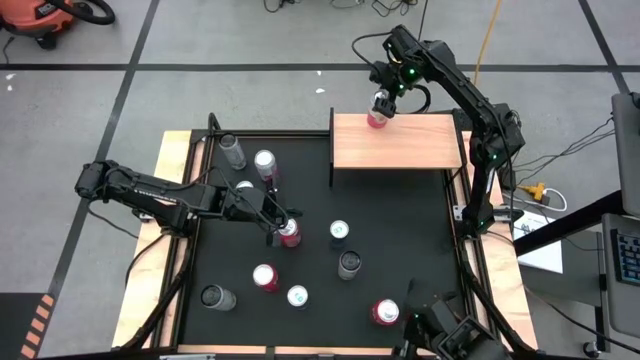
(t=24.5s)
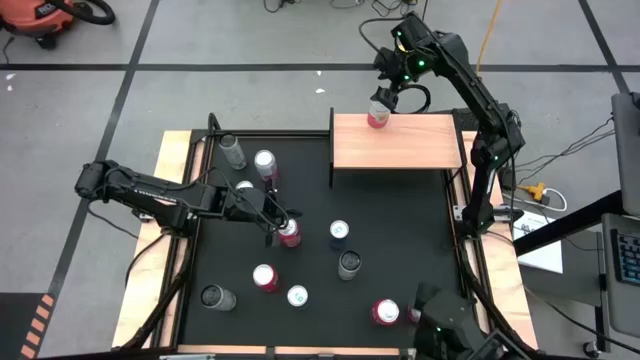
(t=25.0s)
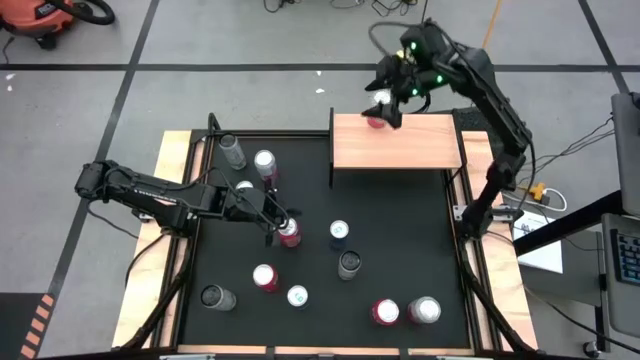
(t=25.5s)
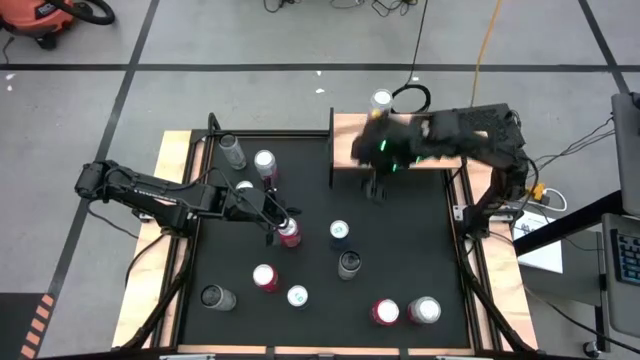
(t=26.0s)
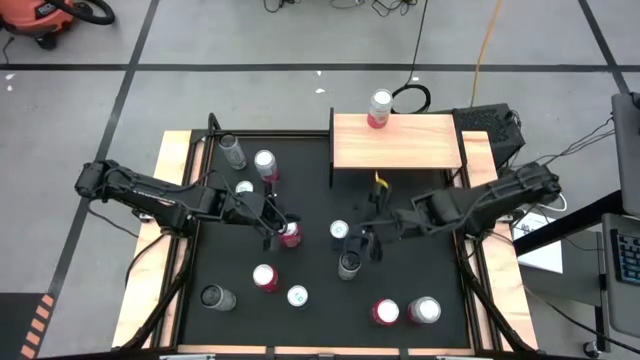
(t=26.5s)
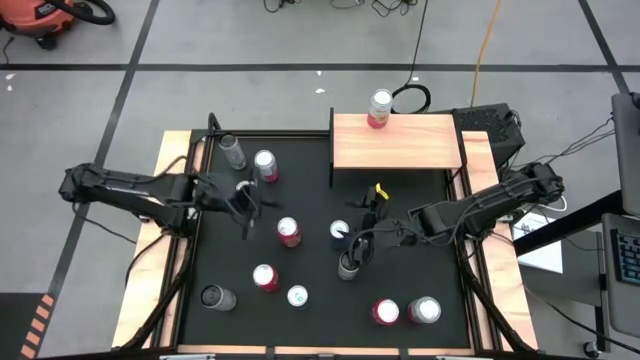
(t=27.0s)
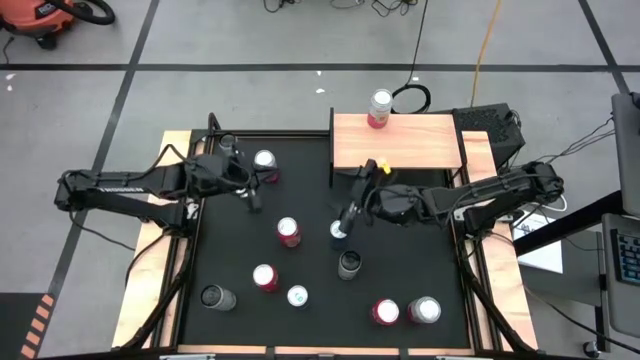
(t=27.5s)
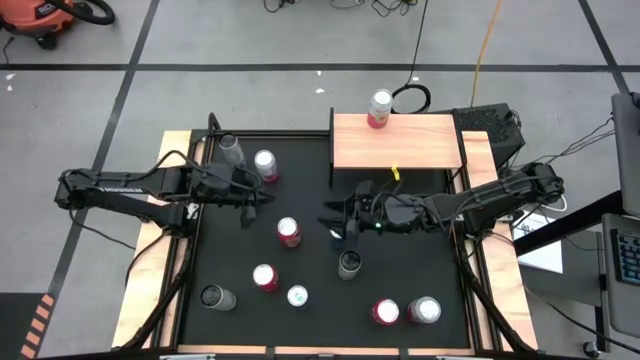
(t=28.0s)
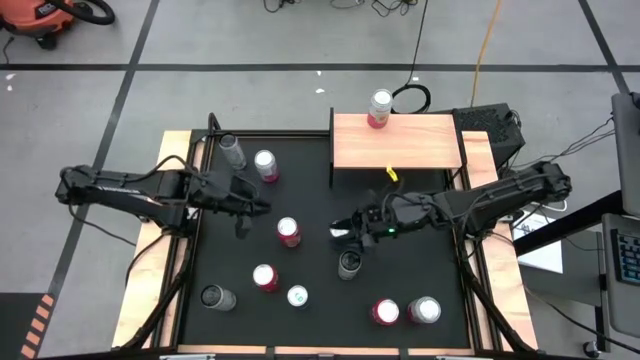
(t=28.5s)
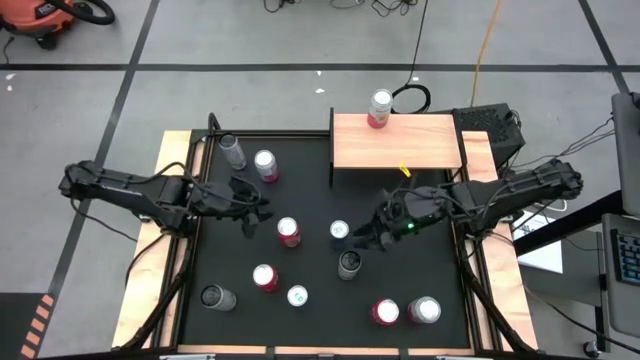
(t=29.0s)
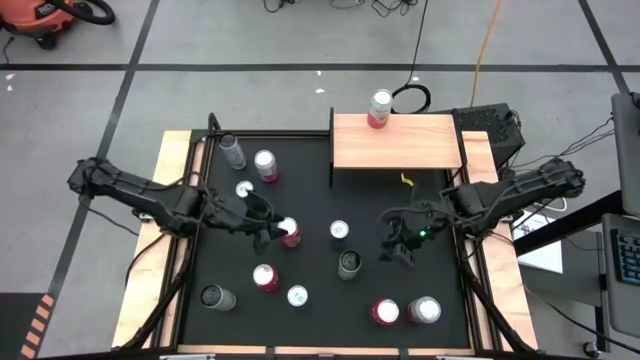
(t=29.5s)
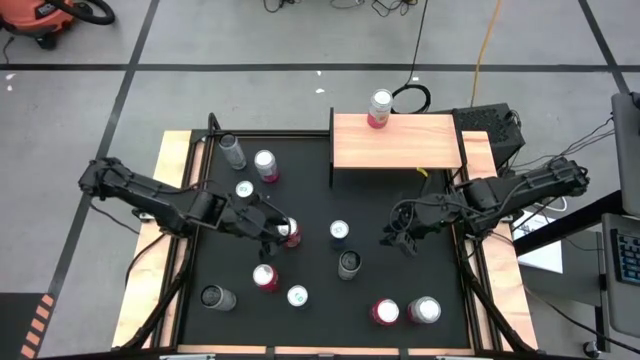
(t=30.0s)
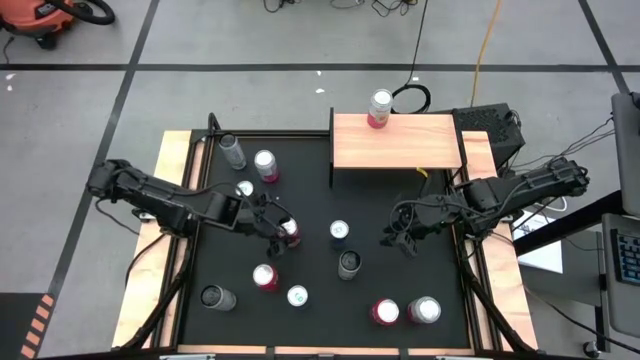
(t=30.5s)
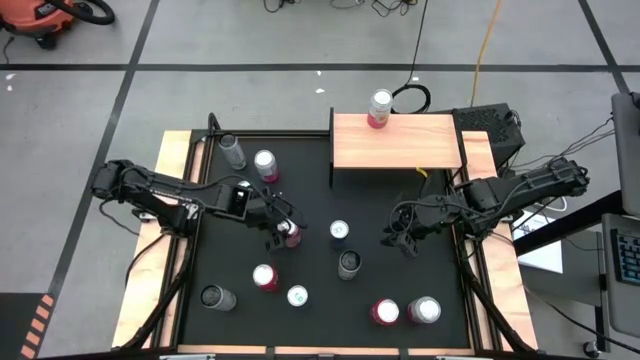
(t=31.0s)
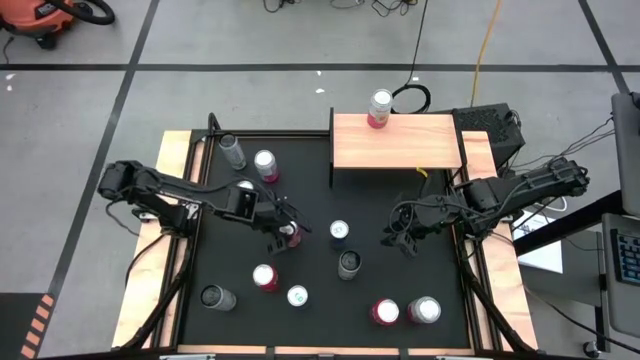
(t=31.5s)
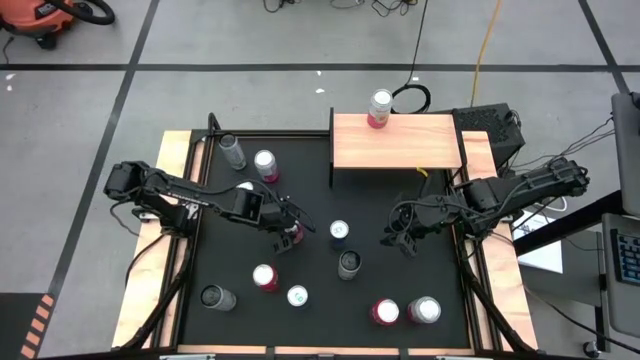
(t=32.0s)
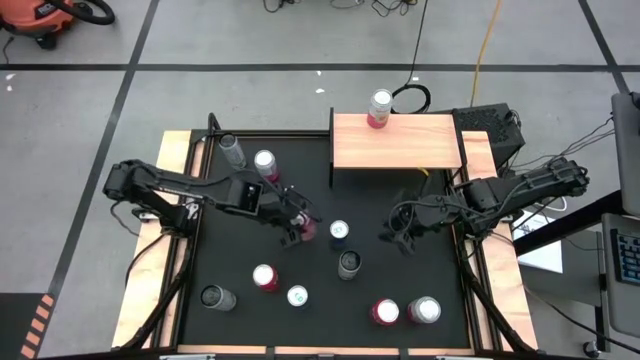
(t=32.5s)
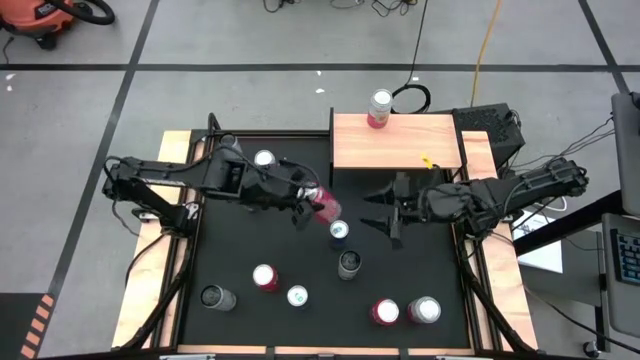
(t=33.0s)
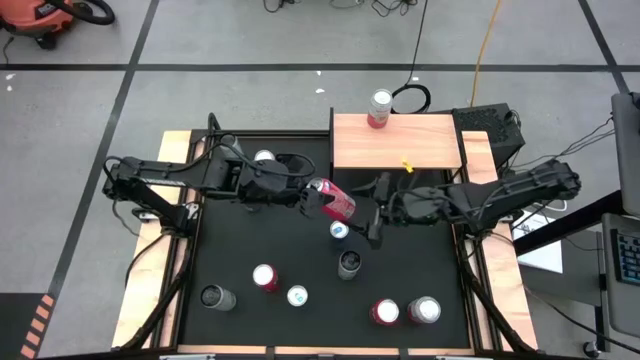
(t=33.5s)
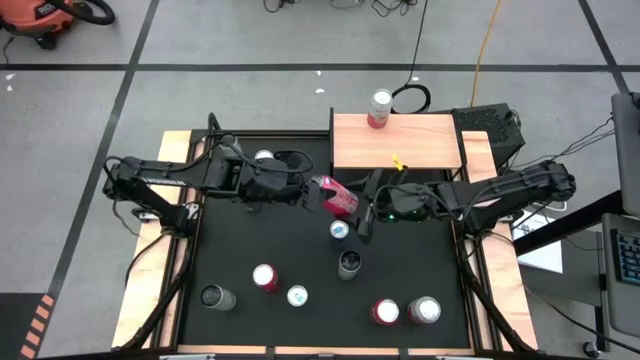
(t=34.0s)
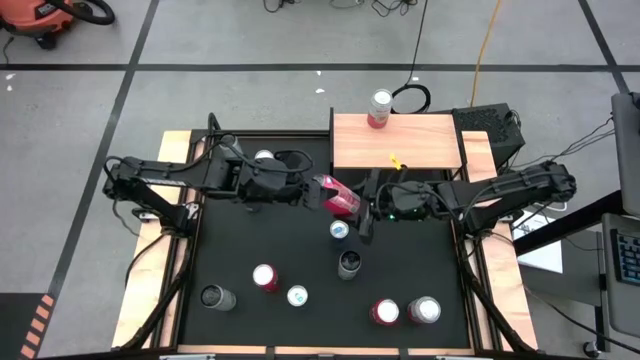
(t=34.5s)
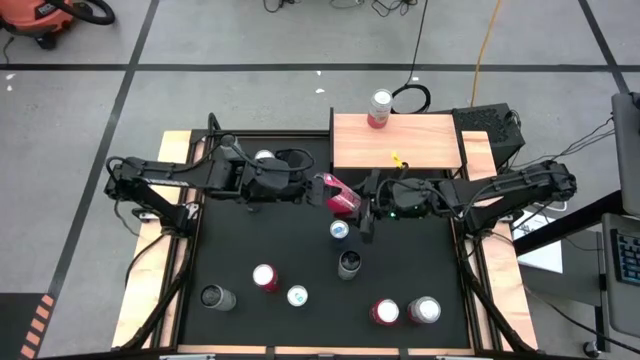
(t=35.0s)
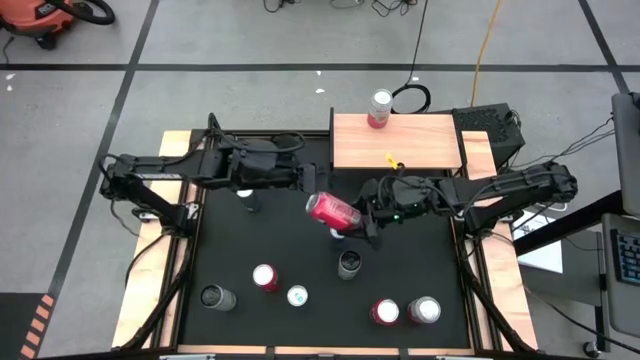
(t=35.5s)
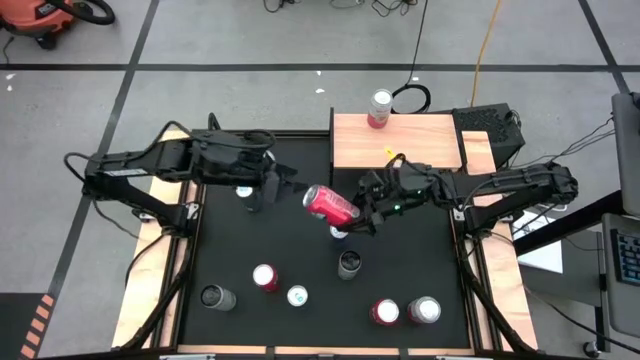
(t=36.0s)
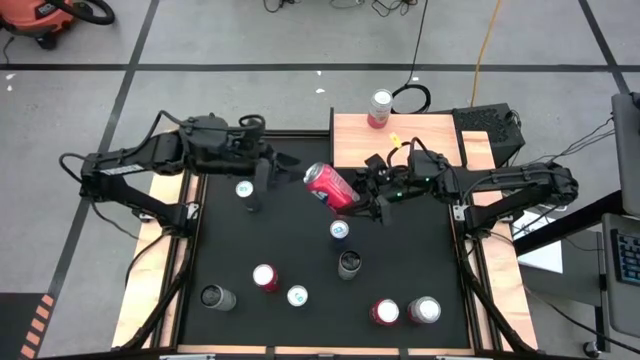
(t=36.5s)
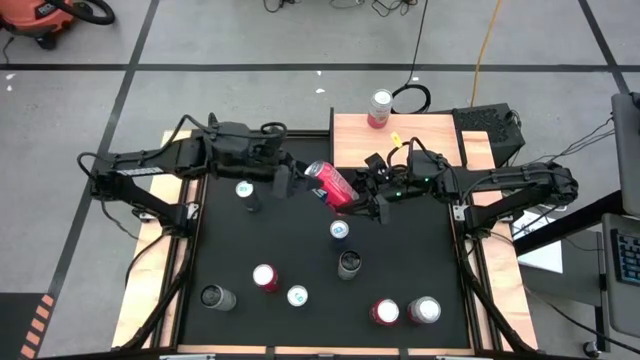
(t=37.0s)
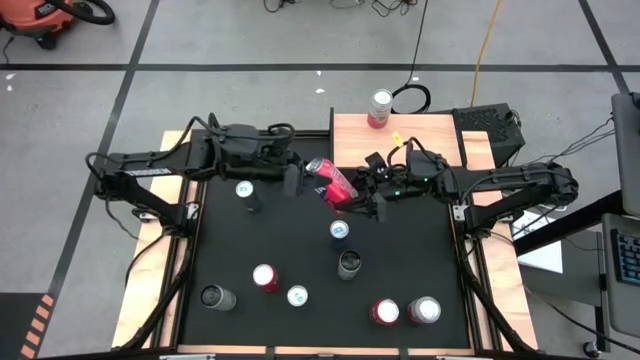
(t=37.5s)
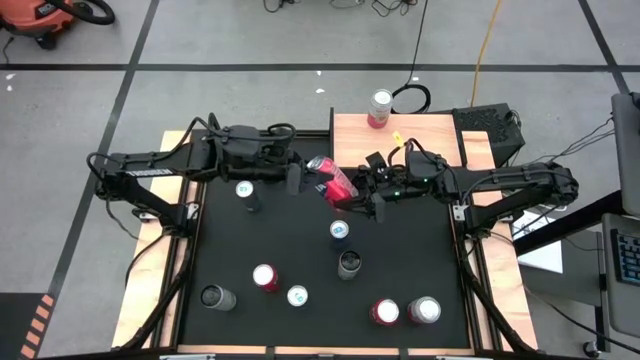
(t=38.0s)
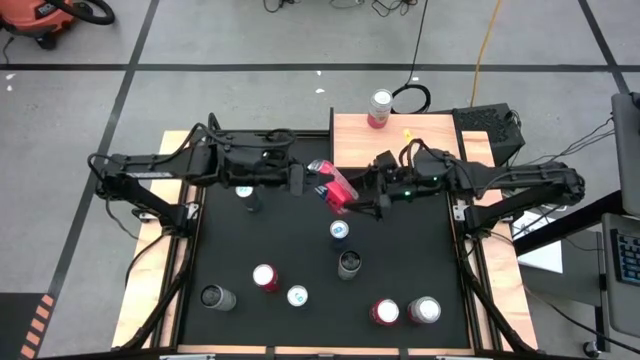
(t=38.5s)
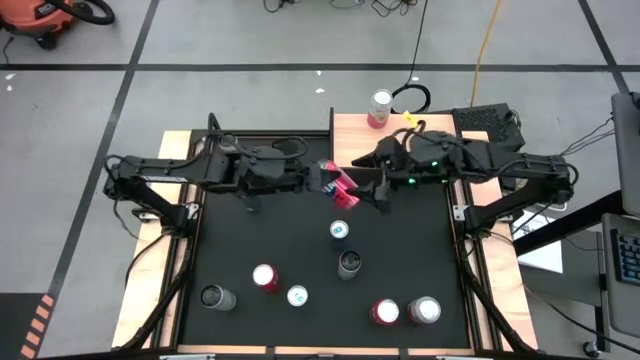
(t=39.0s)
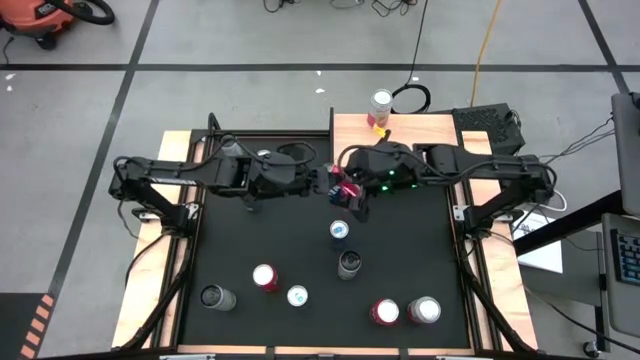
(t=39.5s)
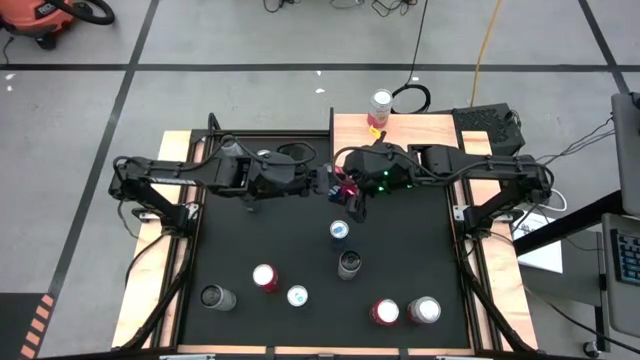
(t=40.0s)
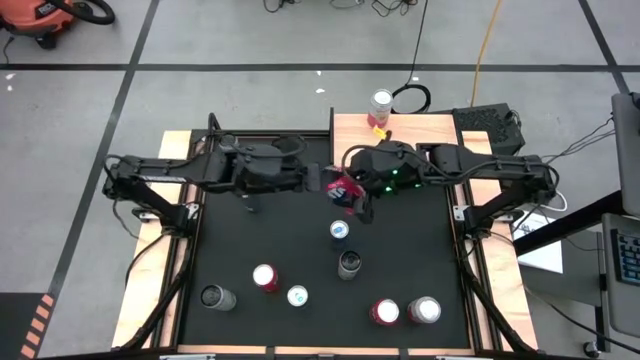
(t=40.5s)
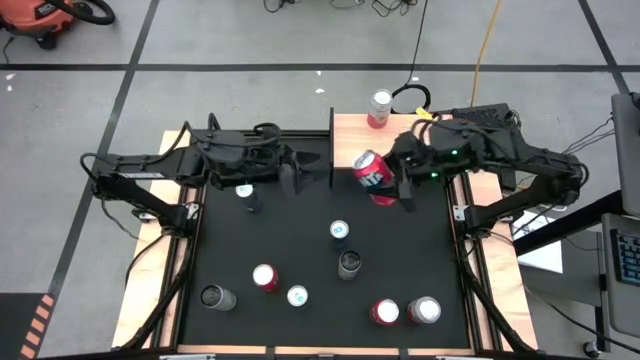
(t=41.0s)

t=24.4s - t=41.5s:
Task: Place canned beverage on shelf
Put the top red soda can on the shelf

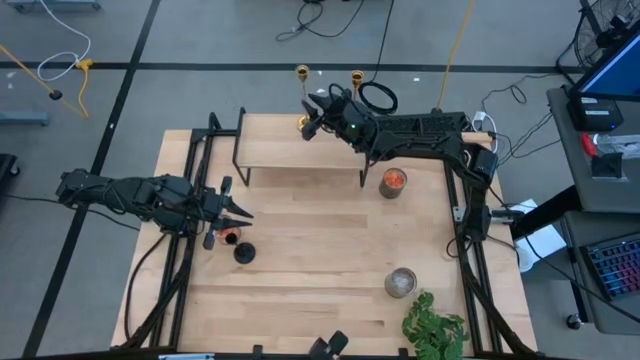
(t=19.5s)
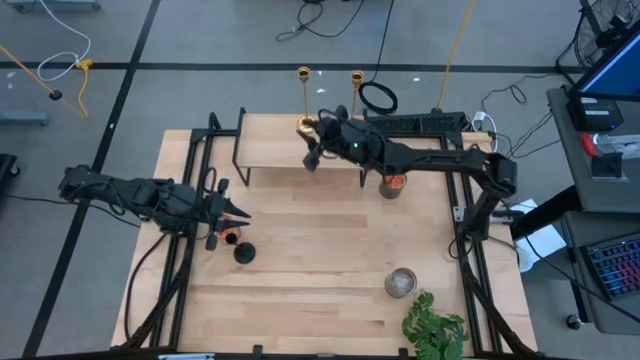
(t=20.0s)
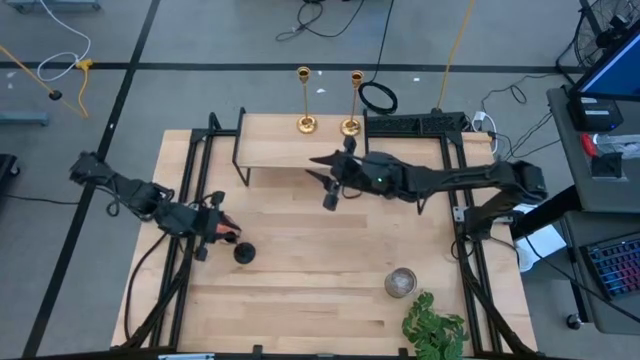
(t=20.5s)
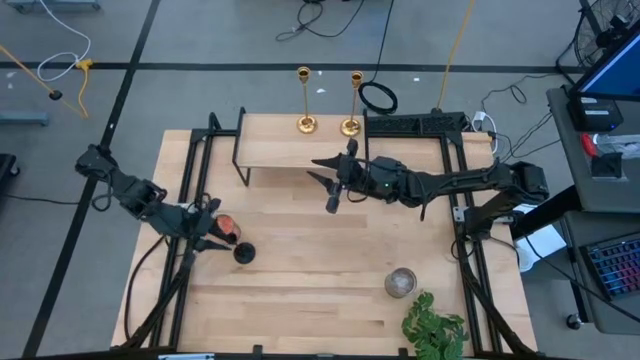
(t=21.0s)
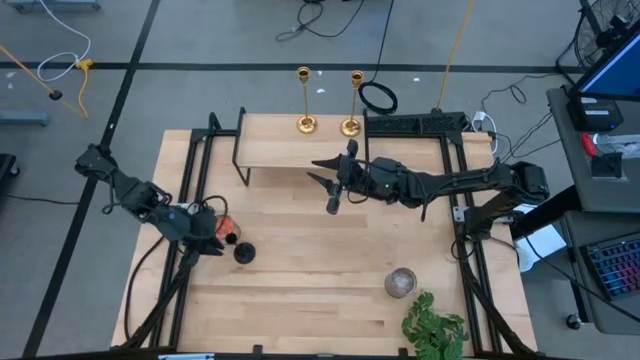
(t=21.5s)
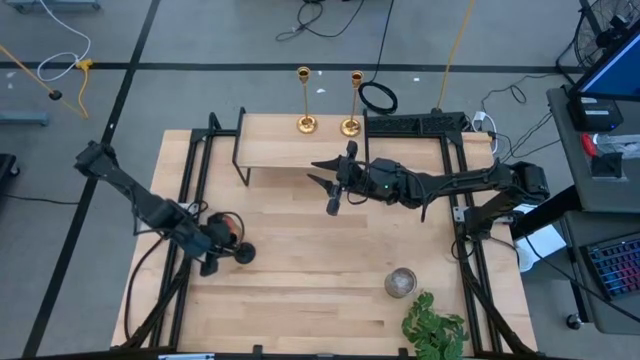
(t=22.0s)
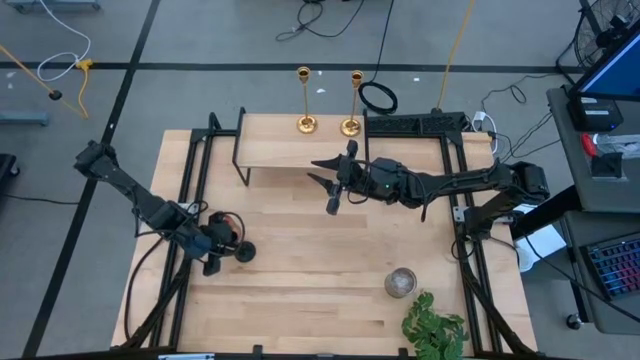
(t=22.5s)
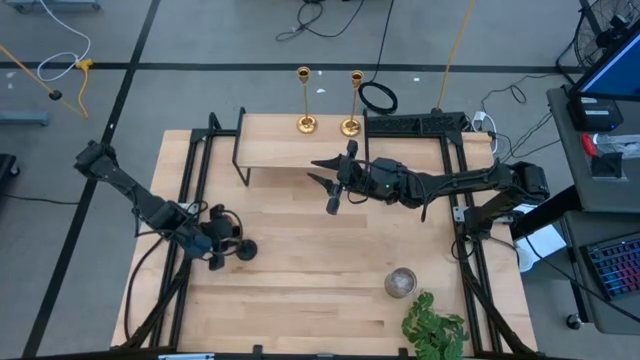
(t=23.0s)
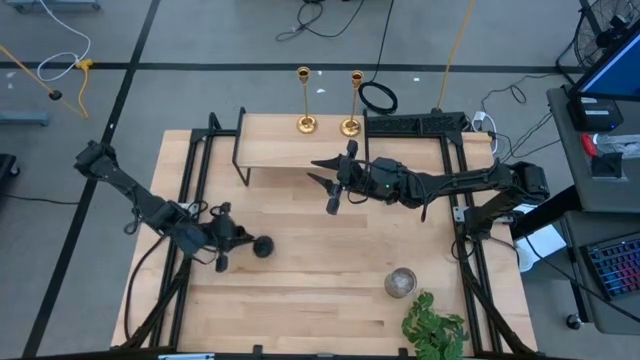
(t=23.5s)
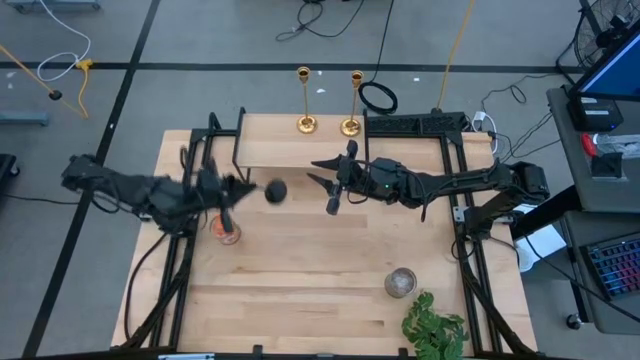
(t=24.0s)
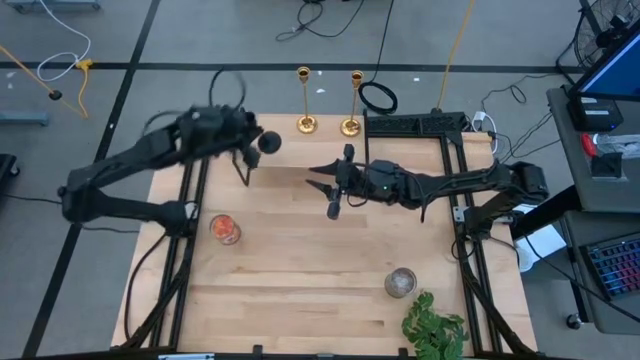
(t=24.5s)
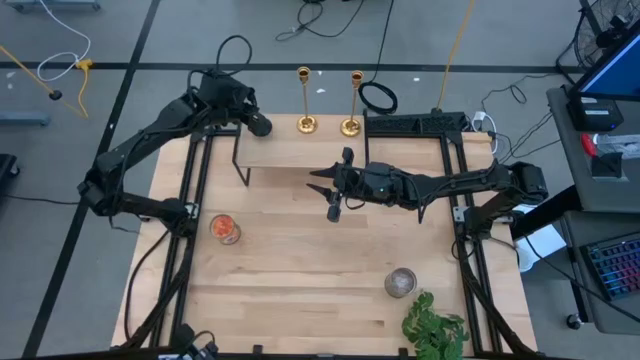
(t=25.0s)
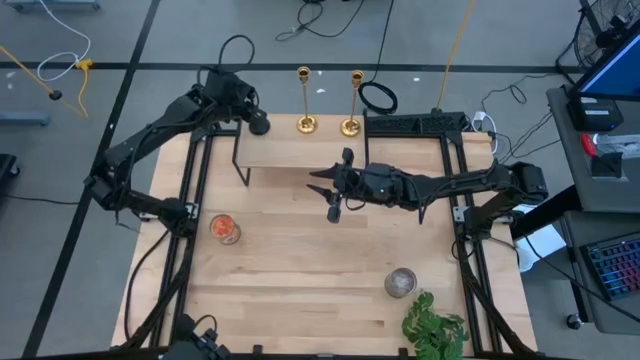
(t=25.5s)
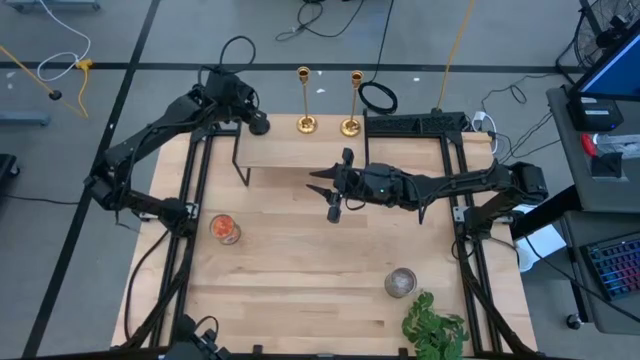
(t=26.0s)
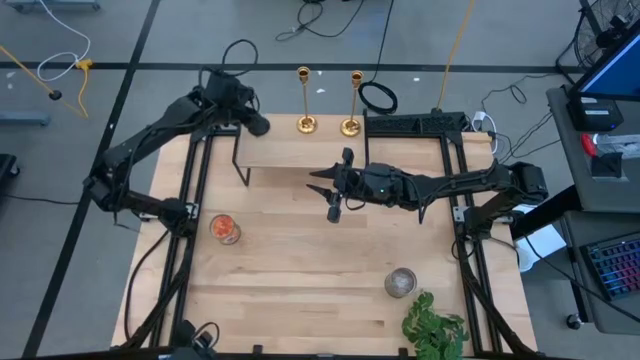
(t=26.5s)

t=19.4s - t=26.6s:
Task: Pick & Place candle stick holders
Put the black candle holder on the shelf
